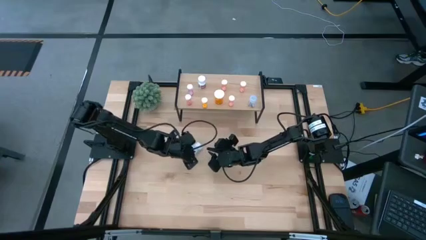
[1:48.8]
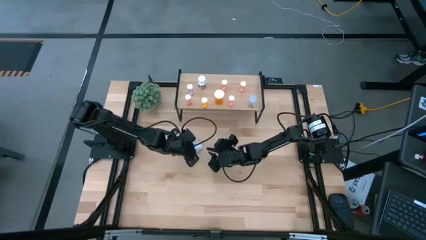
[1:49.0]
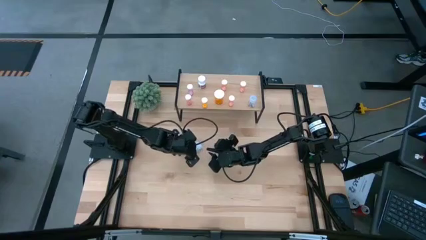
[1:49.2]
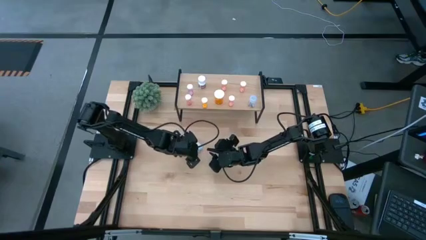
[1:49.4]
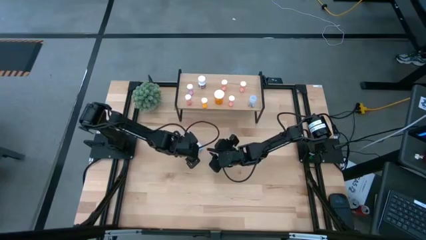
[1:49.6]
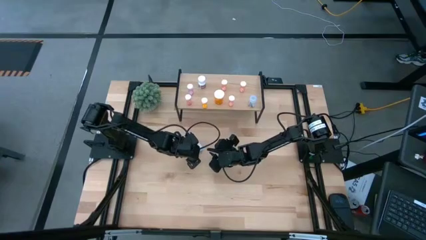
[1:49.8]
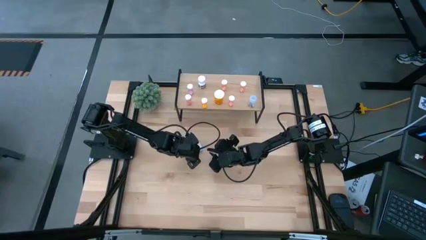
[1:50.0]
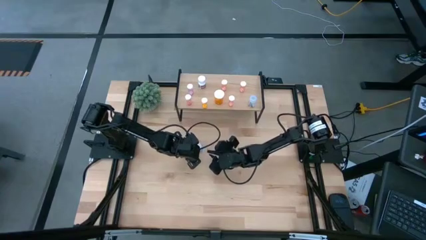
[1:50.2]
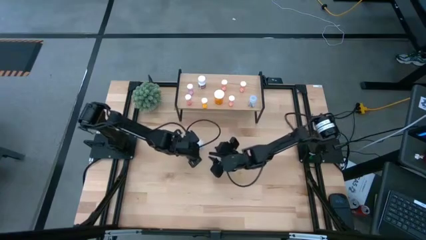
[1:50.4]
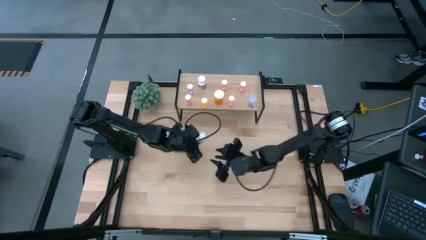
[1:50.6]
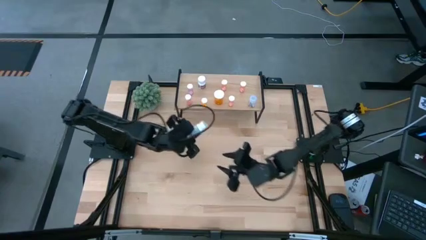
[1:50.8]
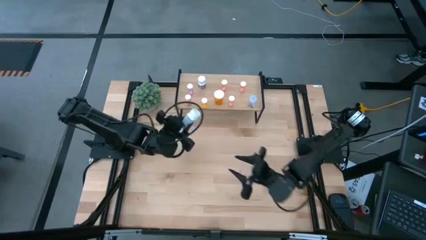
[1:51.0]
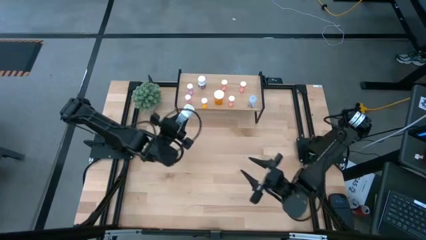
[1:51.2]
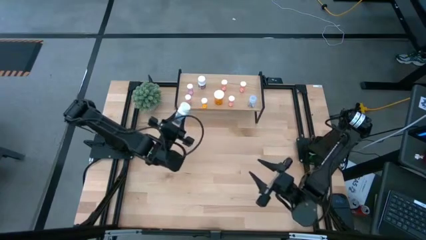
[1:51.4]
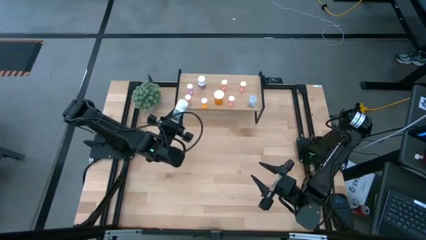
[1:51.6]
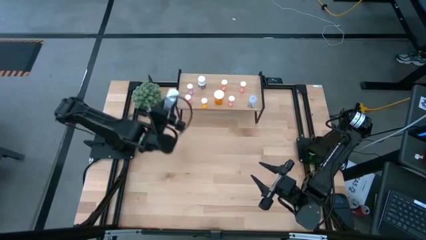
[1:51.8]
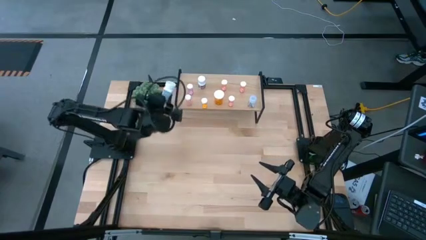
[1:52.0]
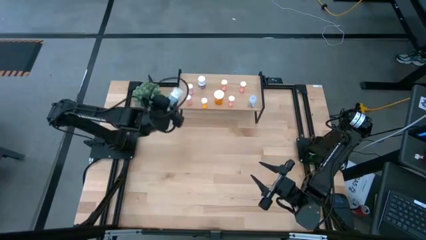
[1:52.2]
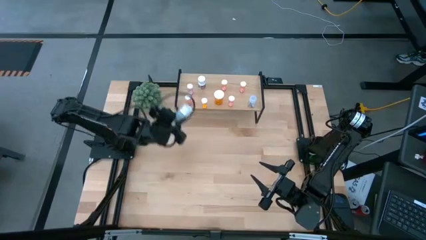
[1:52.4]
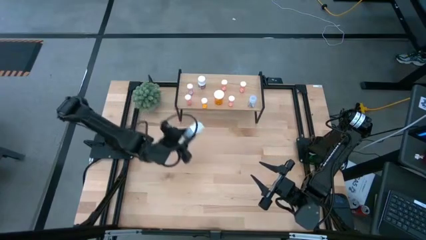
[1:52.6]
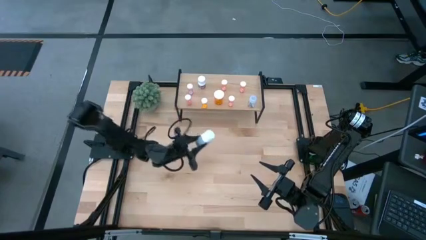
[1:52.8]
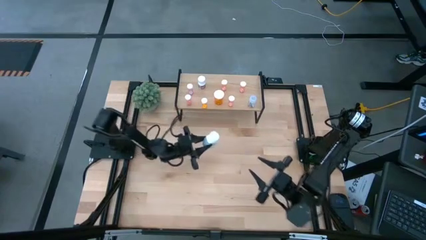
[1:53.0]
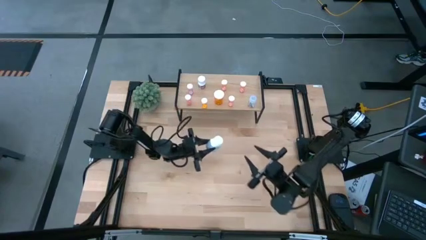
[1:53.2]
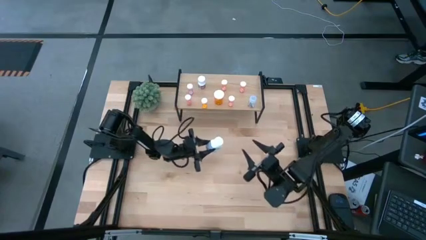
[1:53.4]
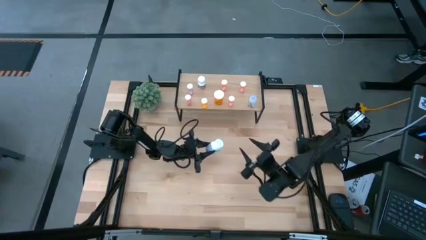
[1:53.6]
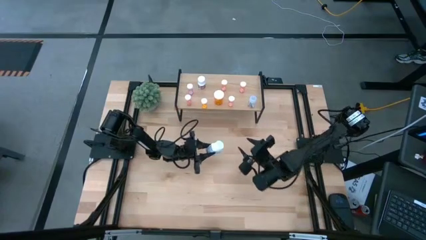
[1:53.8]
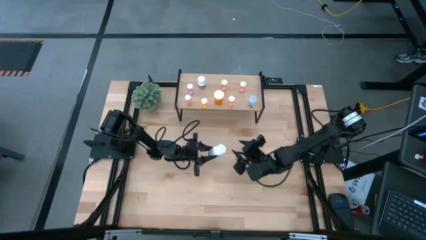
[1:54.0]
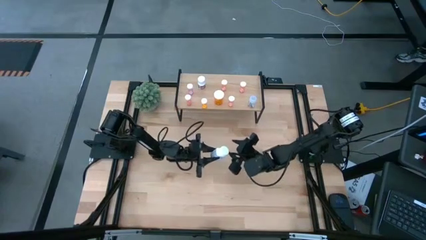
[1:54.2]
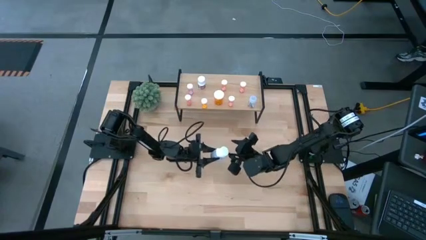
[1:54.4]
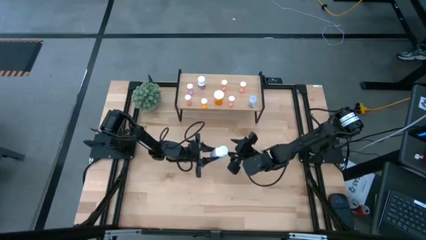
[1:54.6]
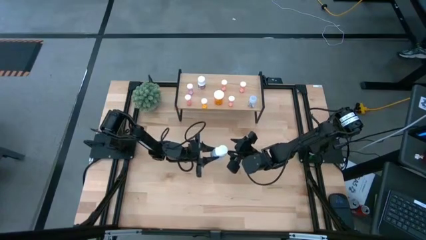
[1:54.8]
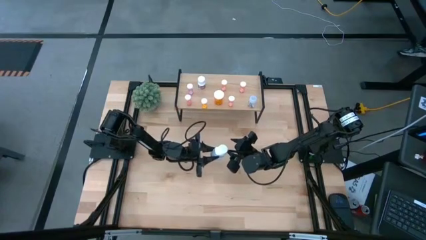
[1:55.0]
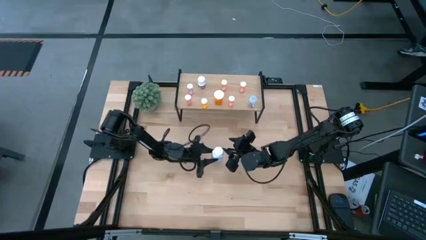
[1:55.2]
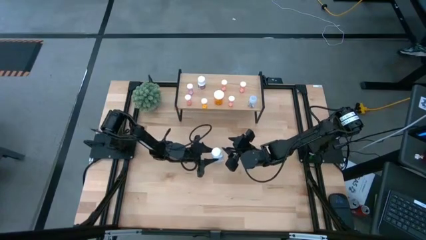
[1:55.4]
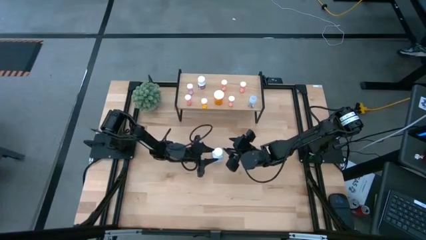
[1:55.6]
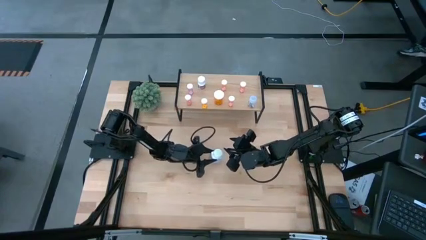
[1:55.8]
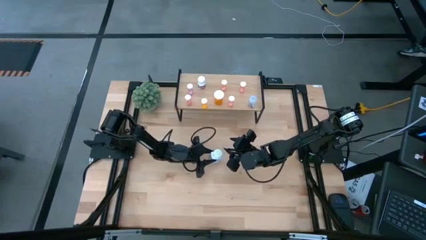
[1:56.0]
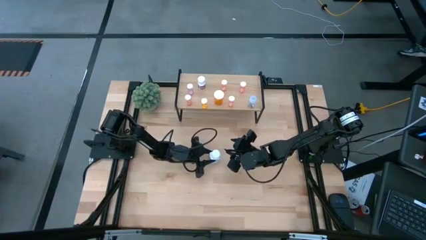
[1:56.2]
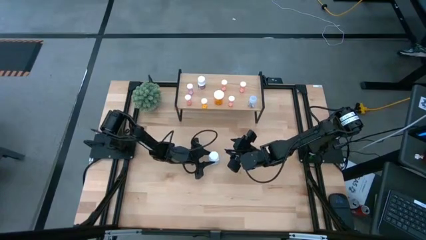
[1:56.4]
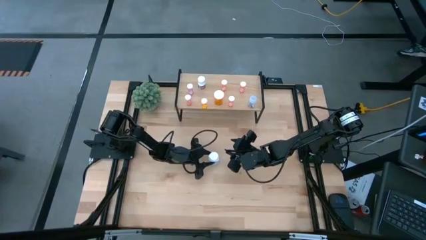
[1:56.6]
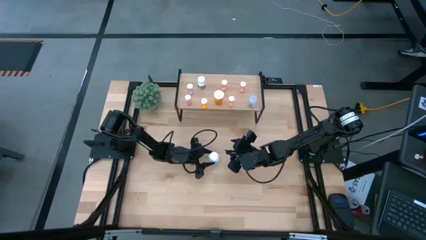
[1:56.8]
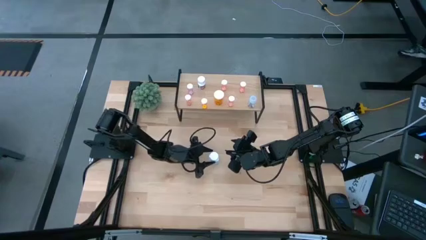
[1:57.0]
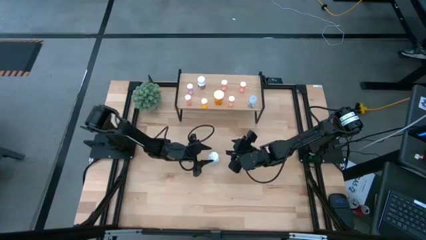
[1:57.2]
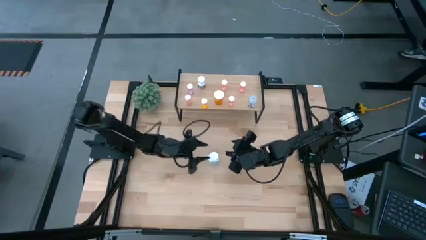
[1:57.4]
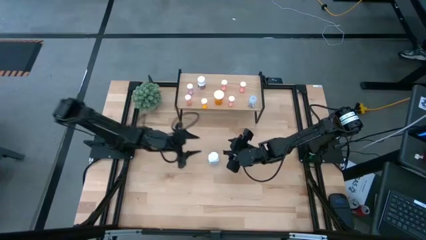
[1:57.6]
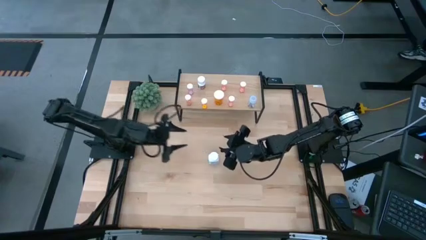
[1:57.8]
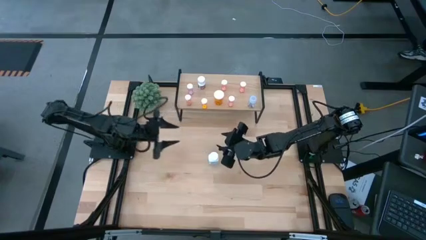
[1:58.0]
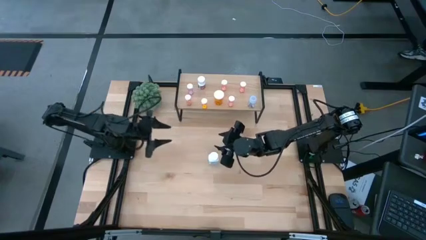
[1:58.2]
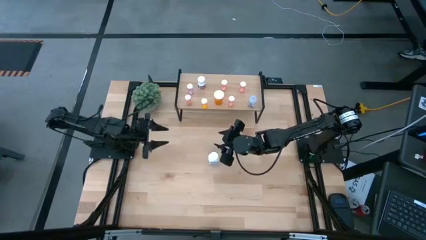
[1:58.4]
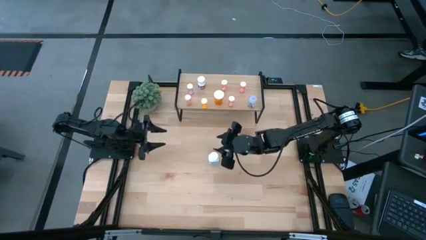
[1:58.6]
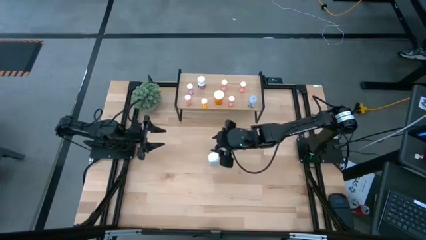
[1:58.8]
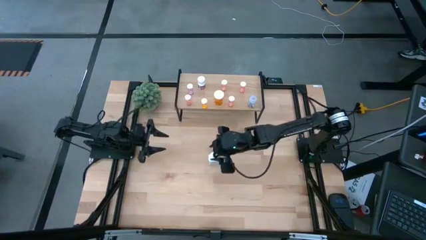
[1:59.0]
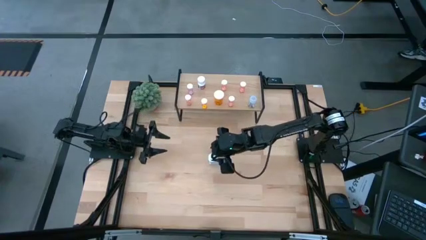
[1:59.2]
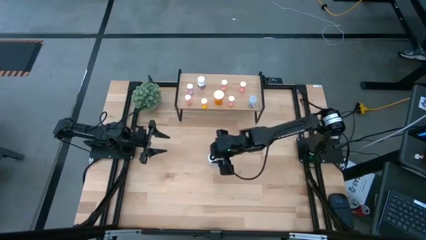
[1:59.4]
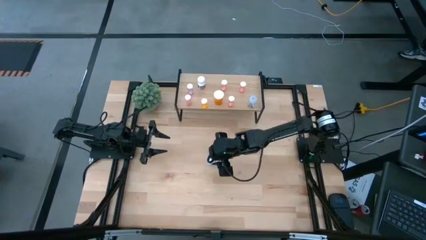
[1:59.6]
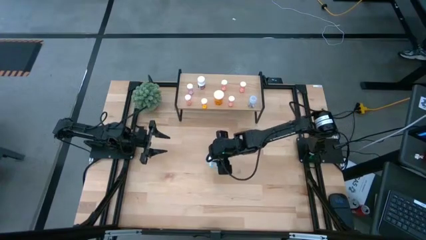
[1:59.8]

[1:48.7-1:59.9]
Task: Pick and place medicine bottles onto shelf by color
Put the white medicine bottle on the shelf

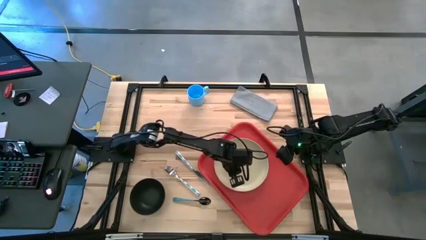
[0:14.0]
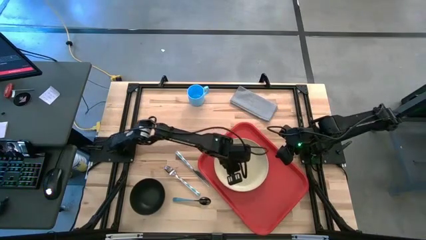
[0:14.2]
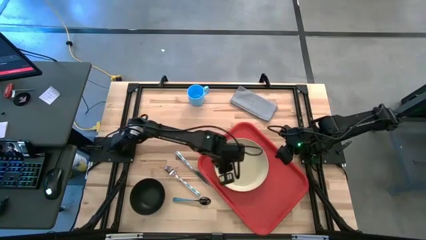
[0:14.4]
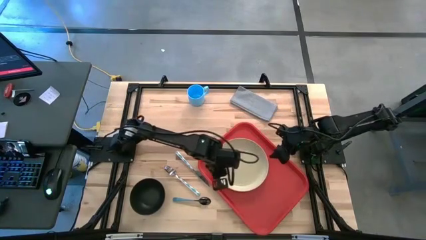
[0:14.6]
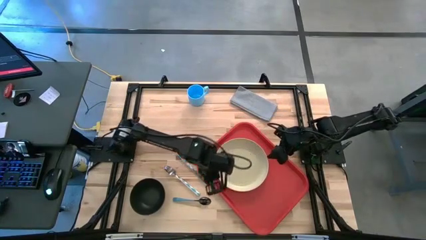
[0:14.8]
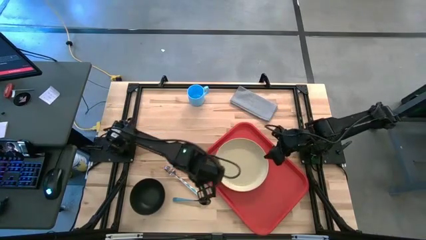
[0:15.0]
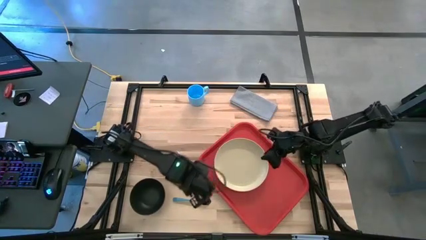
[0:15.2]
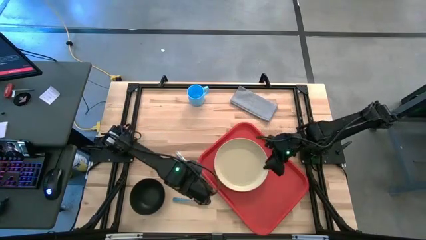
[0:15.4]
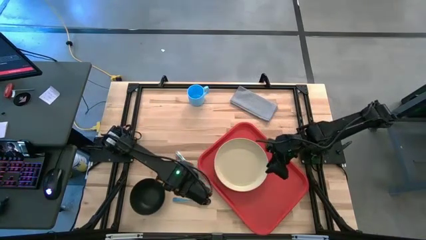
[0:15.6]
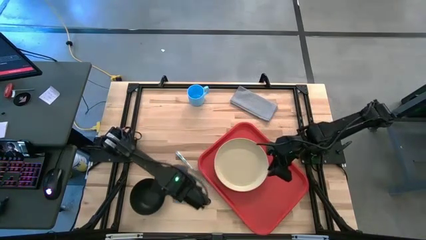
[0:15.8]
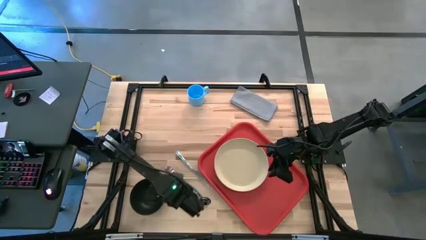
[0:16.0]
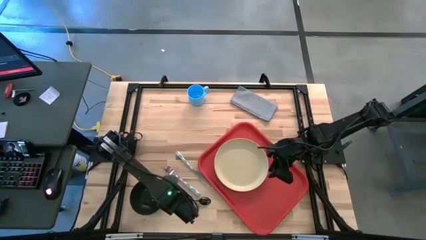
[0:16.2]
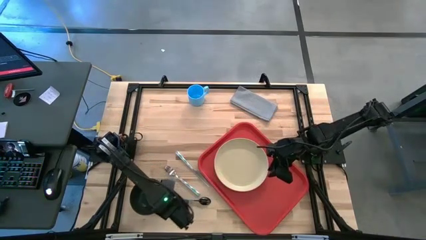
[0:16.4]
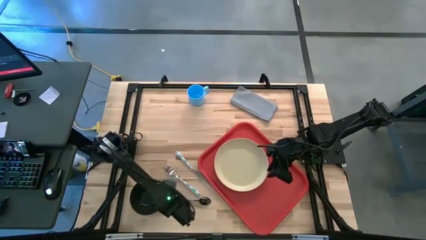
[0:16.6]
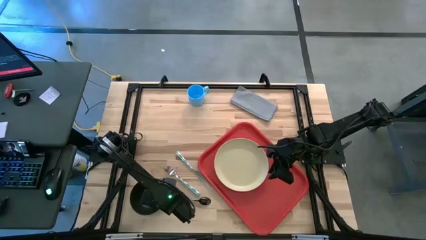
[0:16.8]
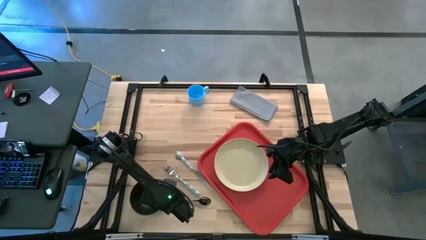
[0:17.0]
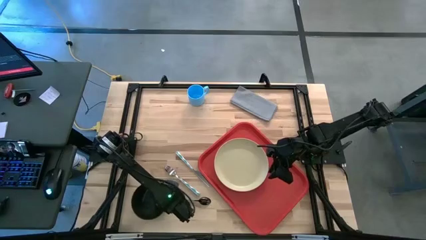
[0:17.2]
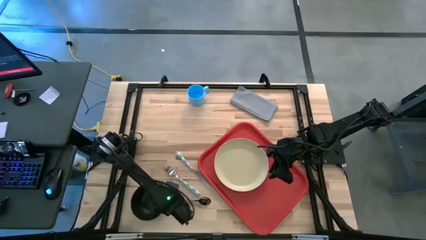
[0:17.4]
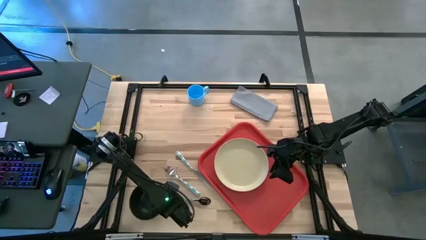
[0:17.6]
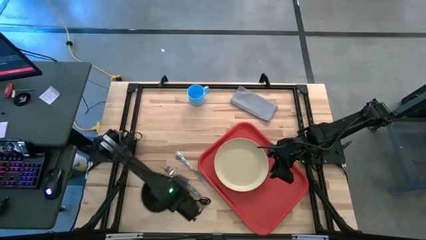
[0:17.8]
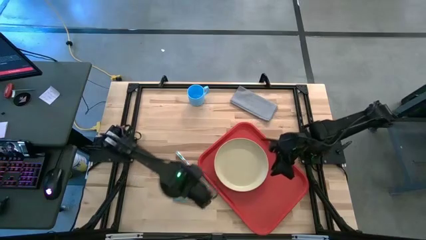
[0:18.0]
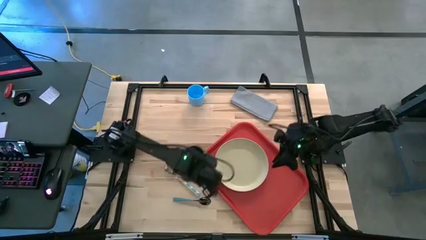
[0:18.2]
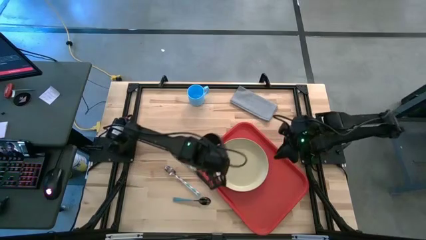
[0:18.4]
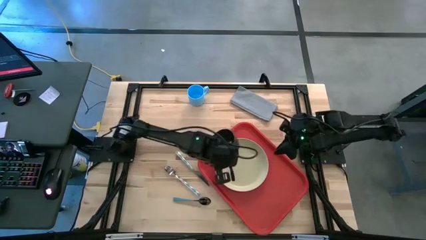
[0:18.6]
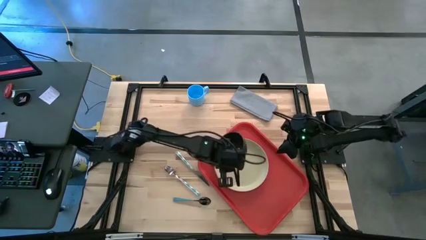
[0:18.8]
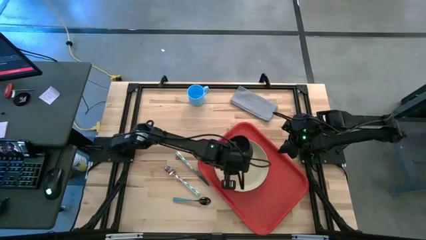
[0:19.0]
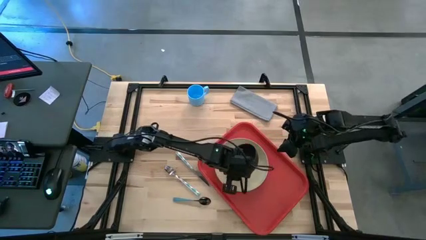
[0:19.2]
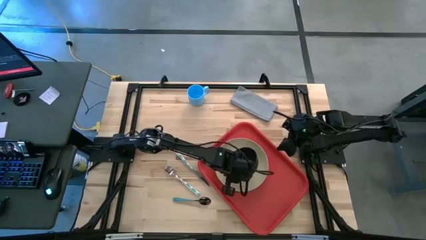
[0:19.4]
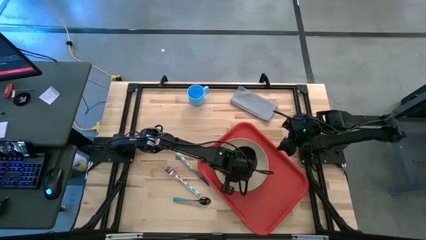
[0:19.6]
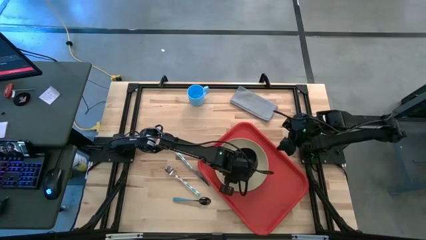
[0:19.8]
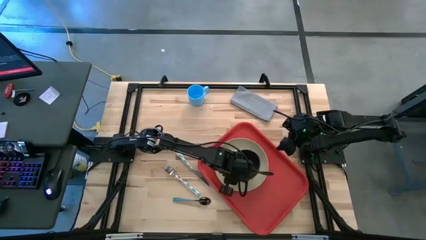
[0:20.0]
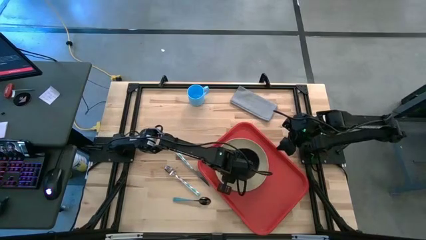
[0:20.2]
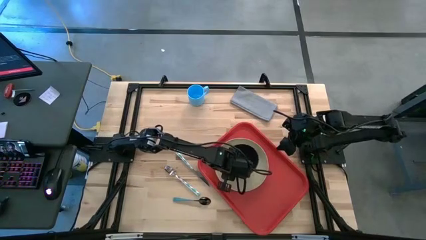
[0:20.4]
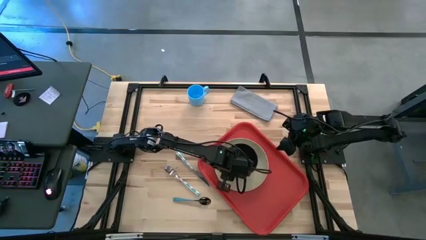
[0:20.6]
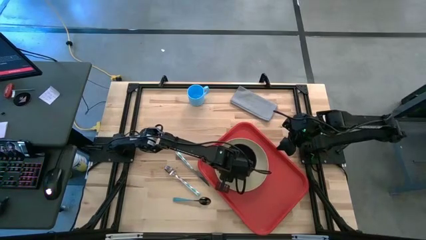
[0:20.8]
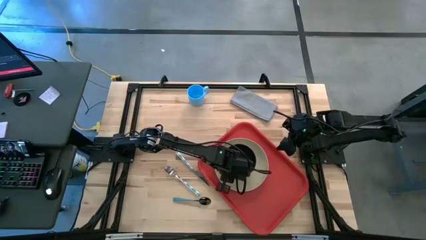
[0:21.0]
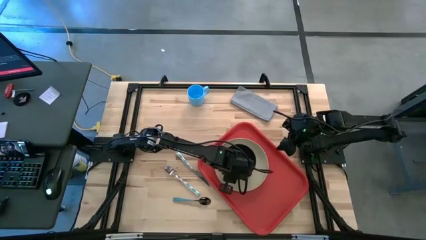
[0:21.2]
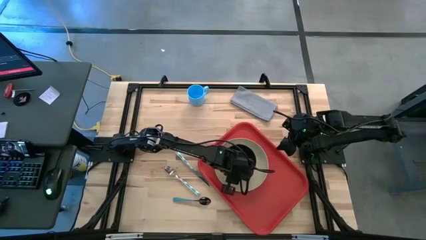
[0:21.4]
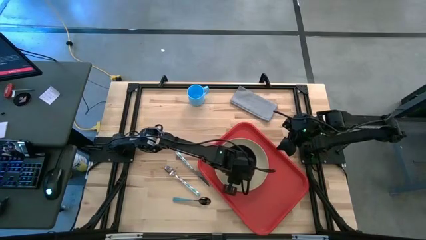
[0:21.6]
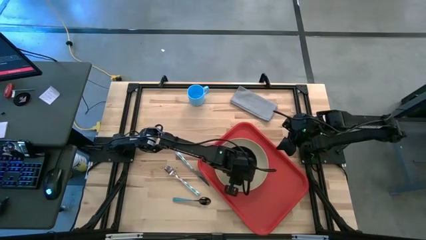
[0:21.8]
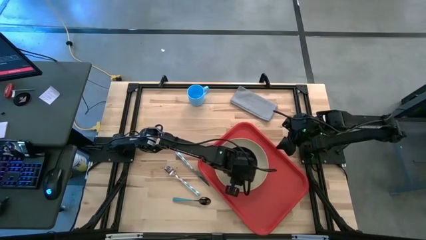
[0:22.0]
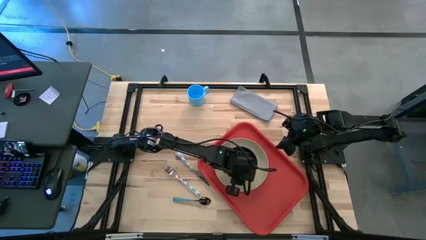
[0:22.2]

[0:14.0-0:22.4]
Task: Set up tray
Put the black bowl on the brown plate
